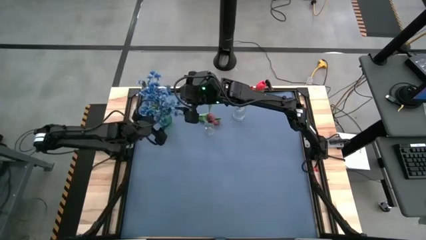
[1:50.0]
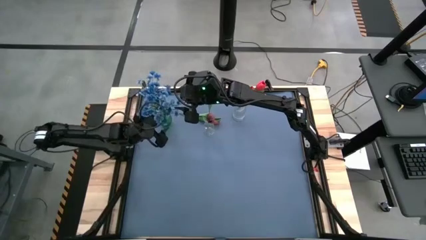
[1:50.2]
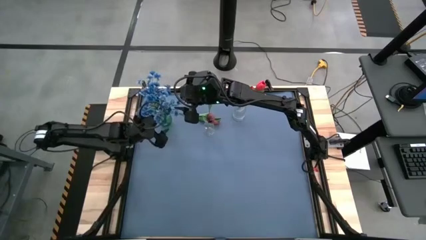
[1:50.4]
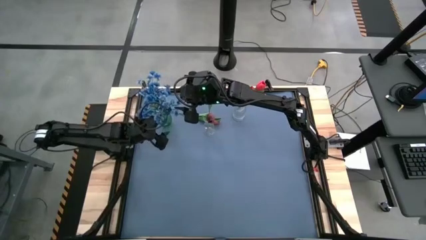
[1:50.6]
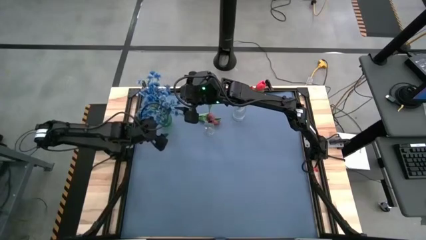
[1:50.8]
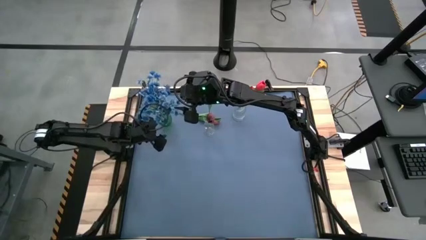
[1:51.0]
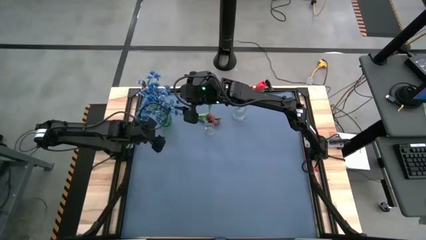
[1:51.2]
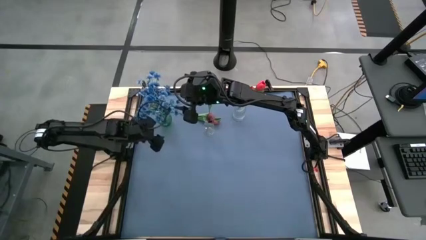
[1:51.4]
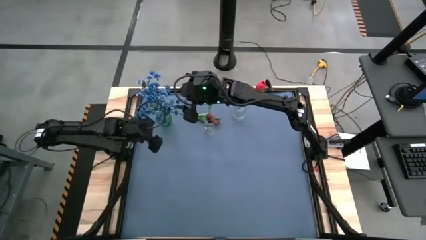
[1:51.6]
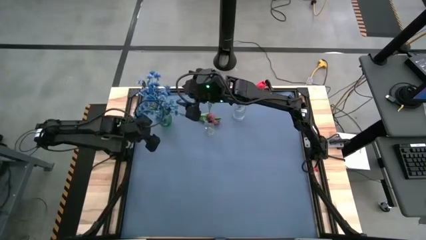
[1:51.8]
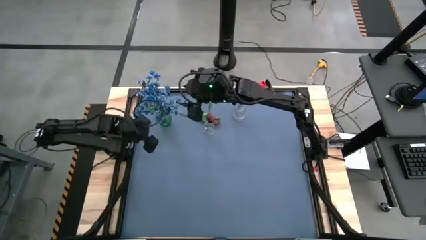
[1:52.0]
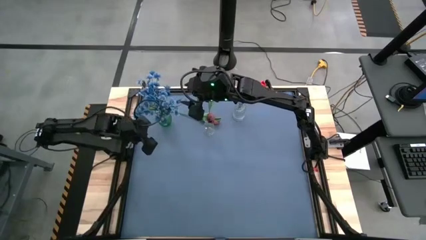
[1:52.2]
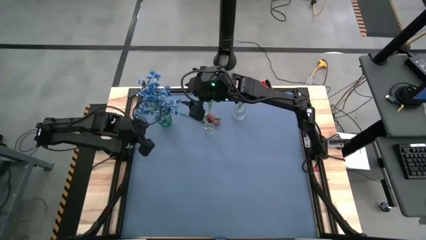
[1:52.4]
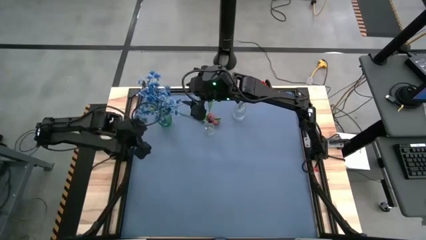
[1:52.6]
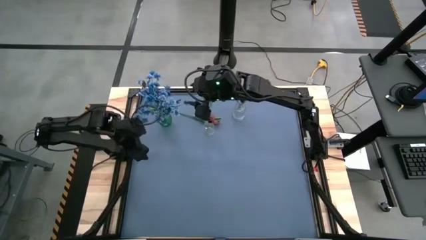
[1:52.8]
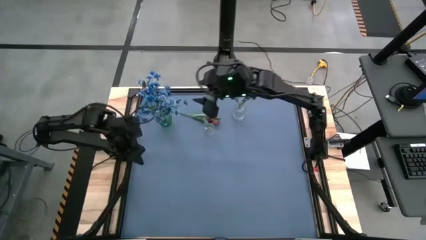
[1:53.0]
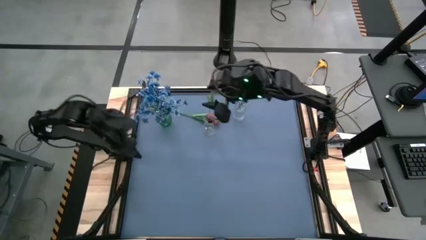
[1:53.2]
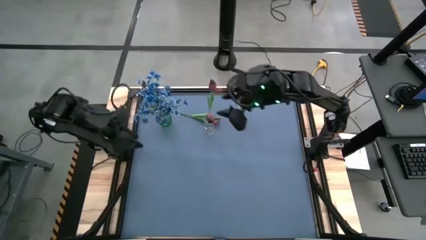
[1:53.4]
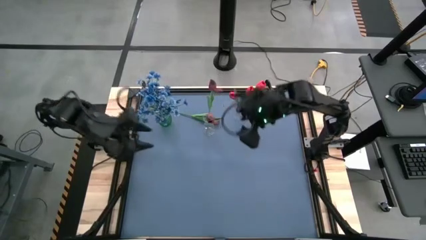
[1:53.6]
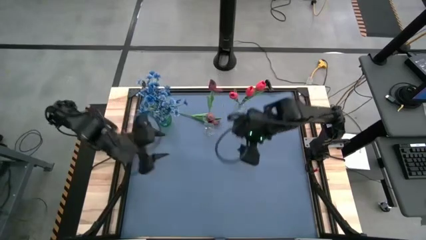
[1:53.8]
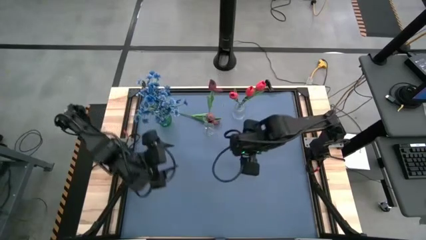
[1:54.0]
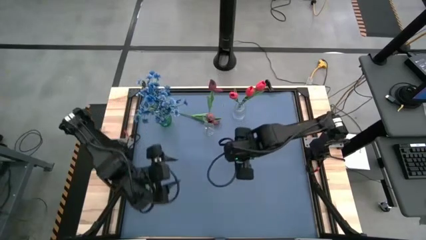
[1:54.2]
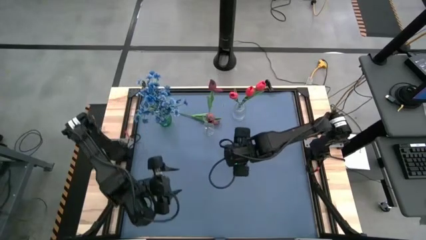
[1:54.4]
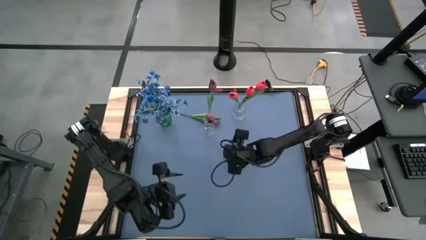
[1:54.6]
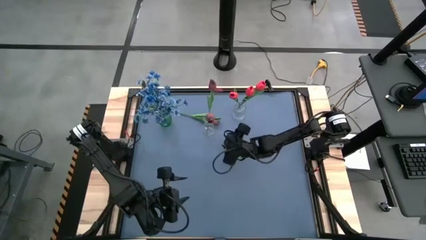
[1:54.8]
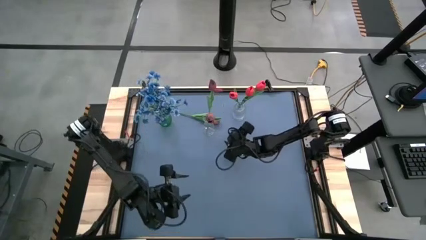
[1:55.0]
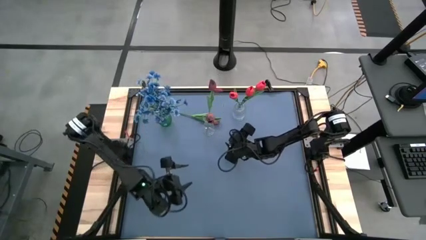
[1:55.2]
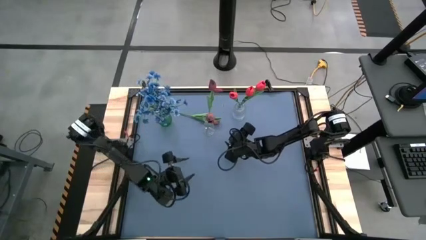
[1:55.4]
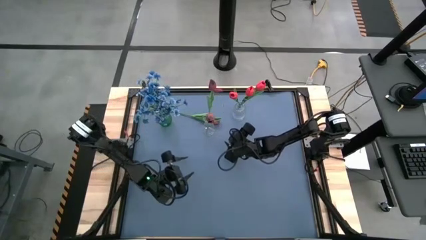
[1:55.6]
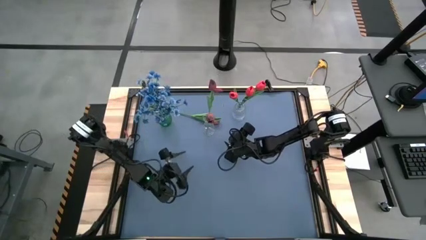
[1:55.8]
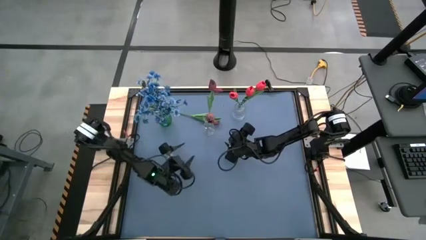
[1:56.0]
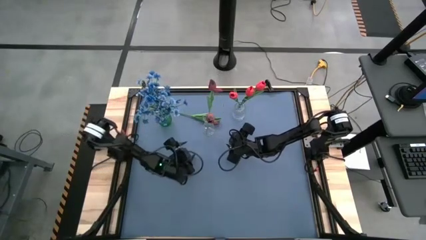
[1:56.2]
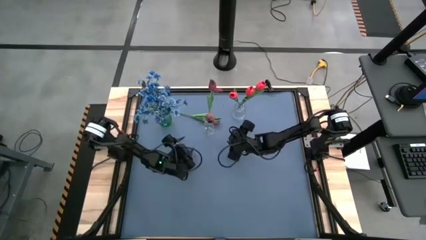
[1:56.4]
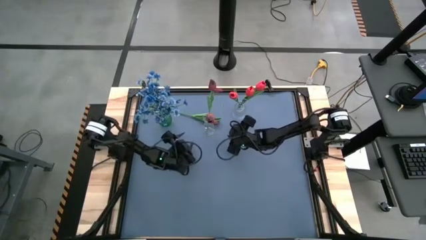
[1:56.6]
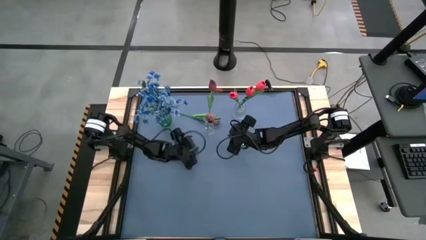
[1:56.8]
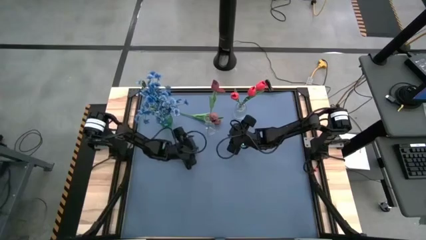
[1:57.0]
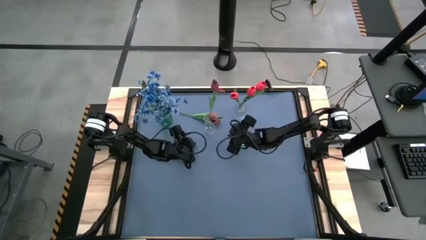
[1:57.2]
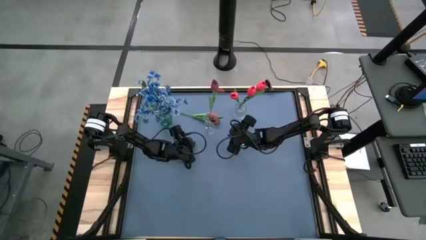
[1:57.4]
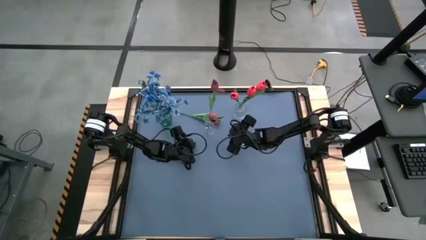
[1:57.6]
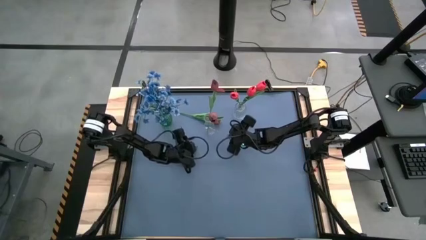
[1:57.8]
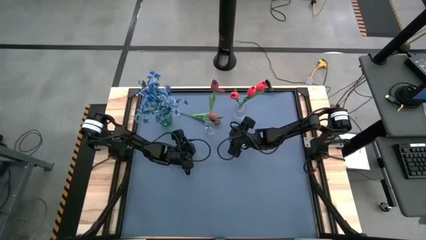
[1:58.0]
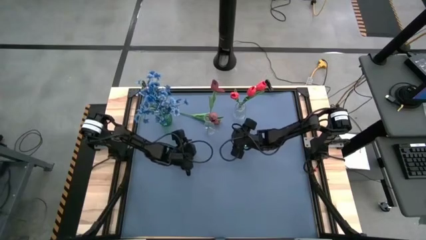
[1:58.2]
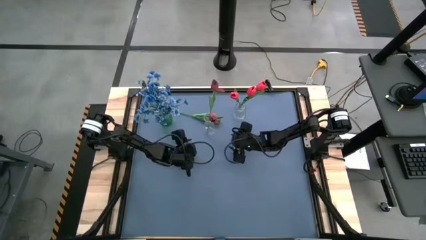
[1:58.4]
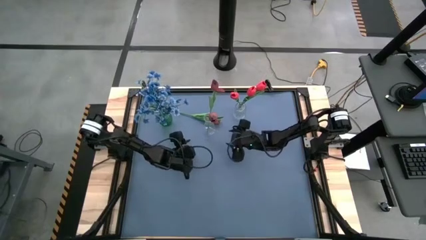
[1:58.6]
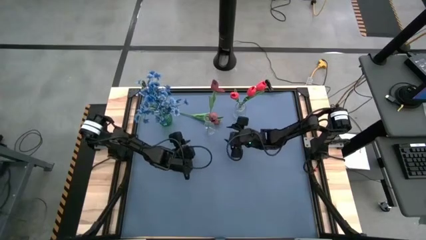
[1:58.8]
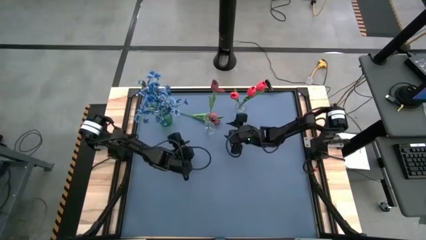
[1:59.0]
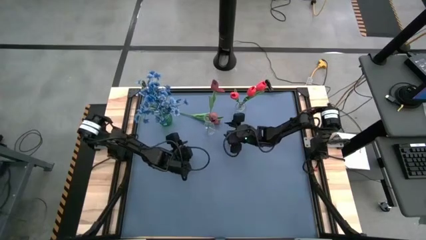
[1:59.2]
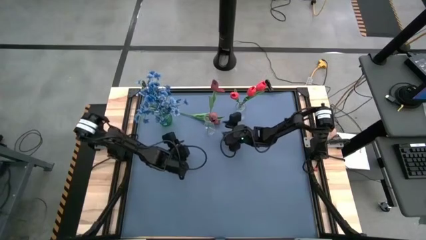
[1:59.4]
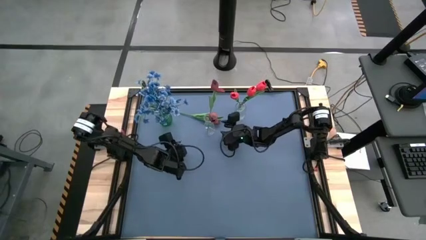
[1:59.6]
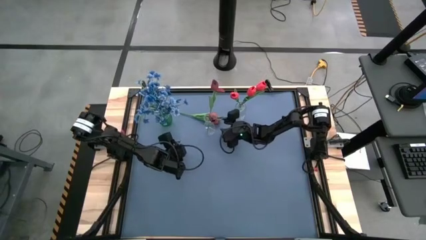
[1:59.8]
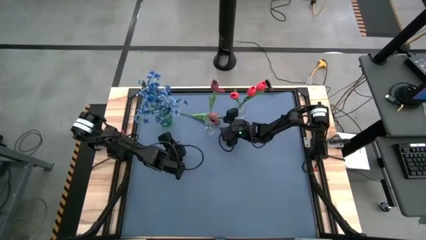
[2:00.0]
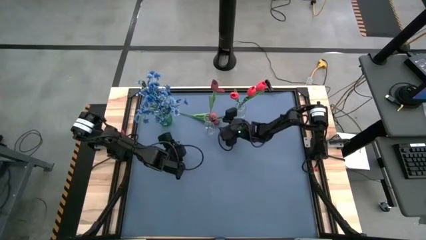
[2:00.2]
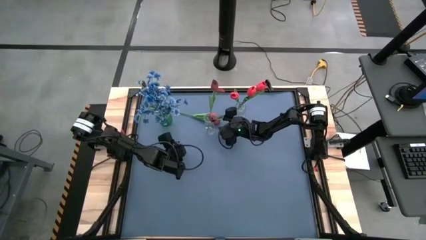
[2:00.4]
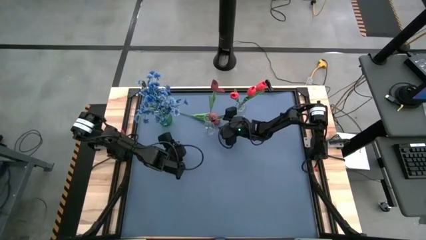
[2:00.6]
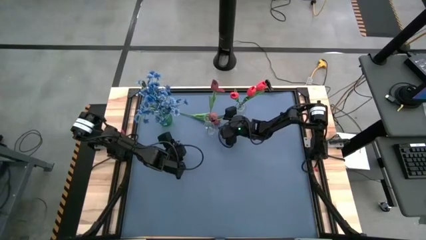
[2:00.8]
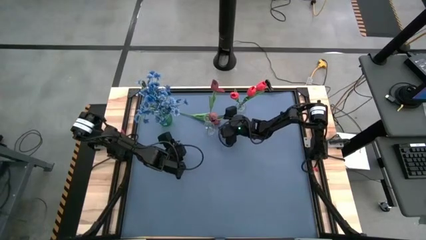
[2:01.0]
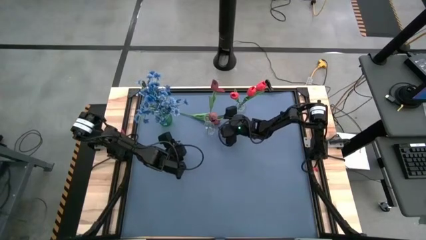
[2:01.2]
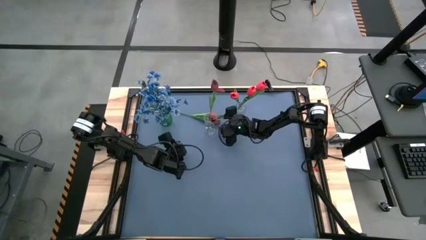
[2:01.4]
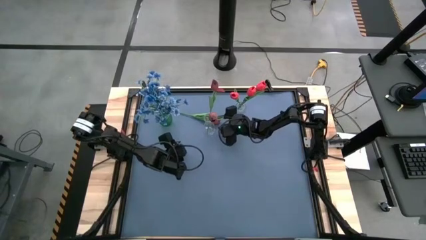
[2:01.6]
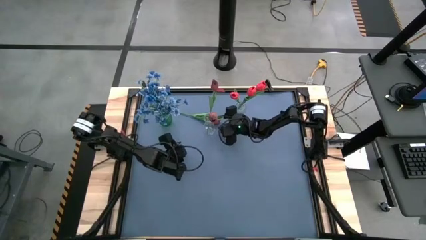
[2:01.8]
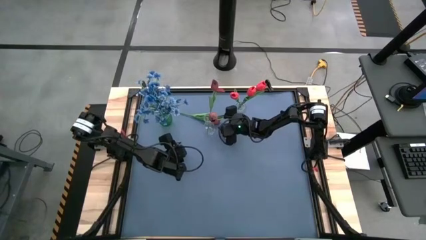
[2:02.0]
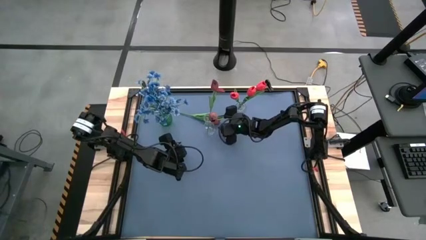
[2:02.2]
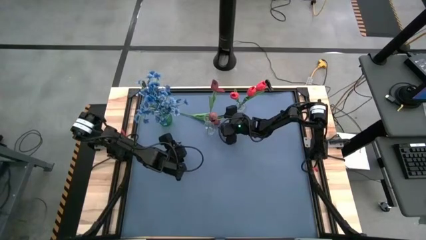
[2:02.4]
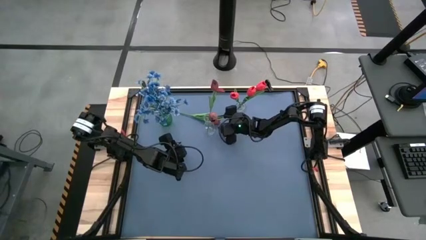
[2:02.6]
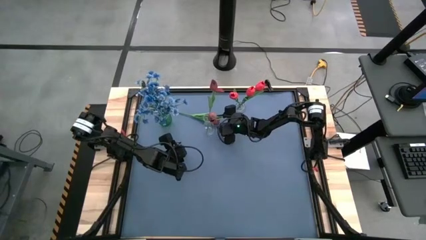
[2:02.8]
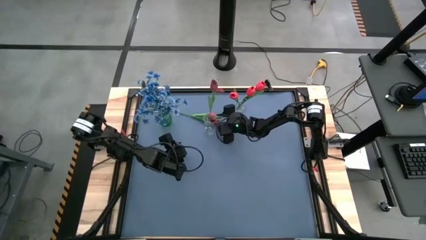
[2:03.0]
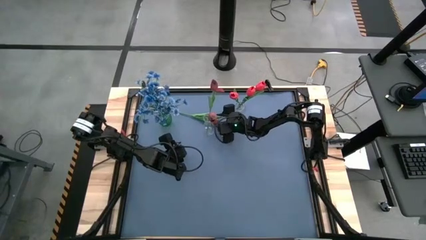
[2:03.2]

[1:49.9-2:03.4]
Task: Sort flowers into vase by color
Put the dark red tulip into the bottom transparent vase
